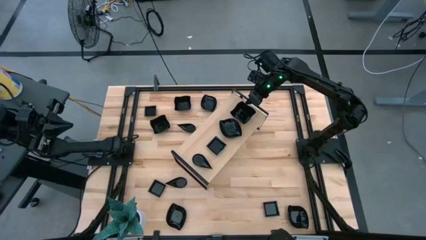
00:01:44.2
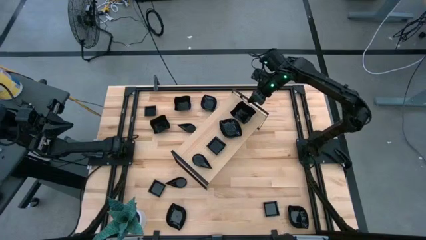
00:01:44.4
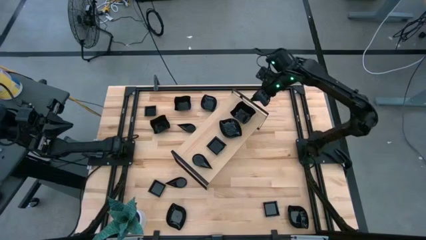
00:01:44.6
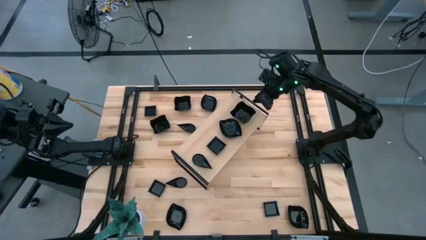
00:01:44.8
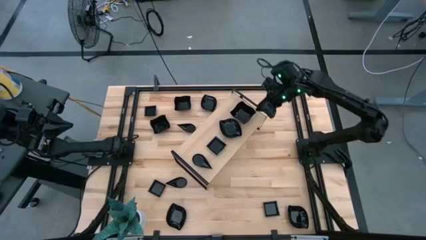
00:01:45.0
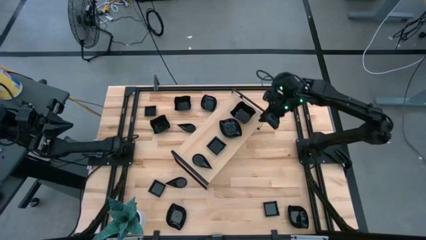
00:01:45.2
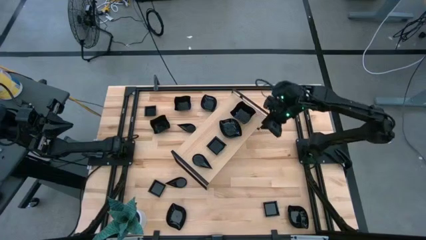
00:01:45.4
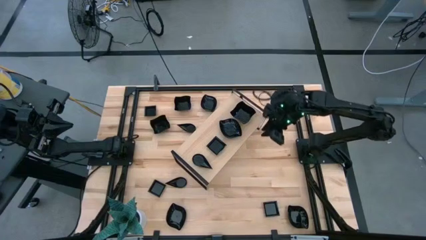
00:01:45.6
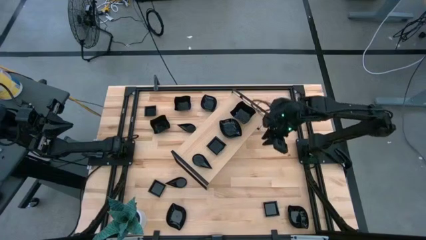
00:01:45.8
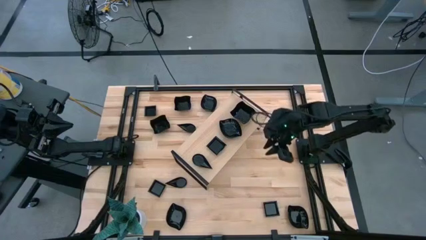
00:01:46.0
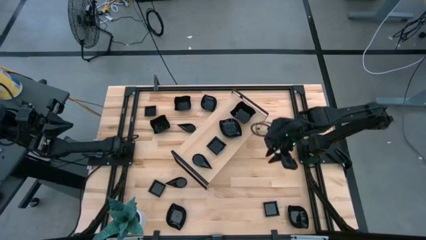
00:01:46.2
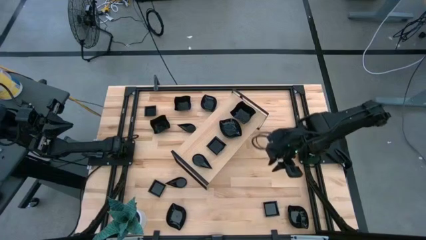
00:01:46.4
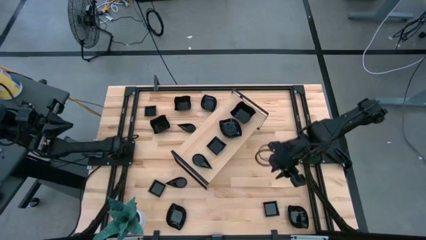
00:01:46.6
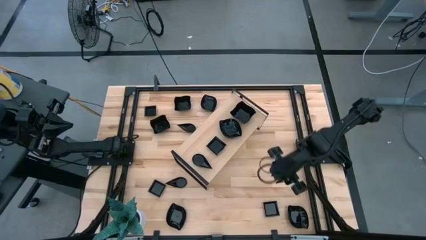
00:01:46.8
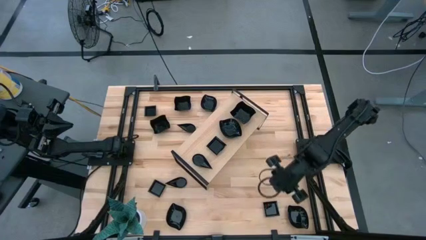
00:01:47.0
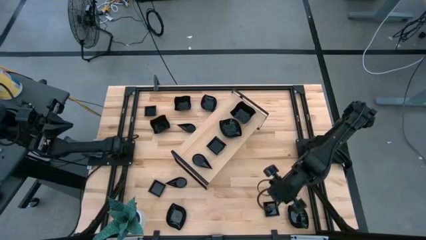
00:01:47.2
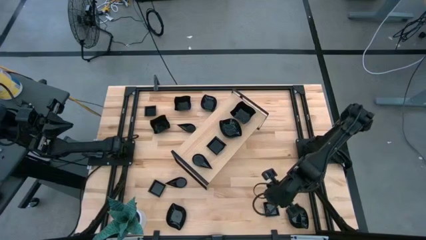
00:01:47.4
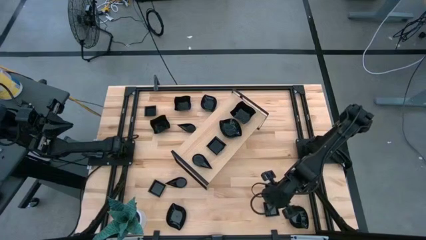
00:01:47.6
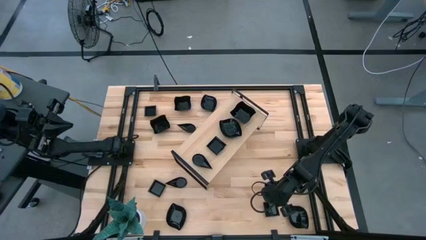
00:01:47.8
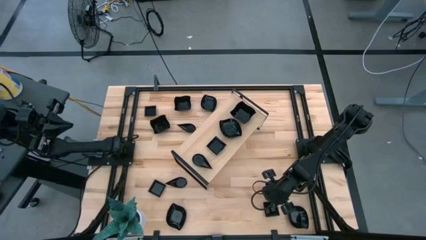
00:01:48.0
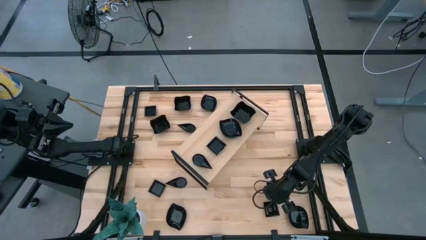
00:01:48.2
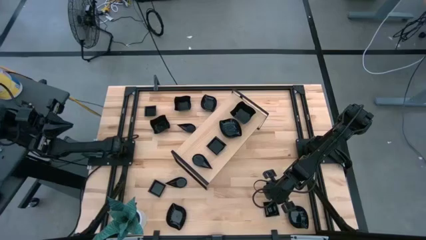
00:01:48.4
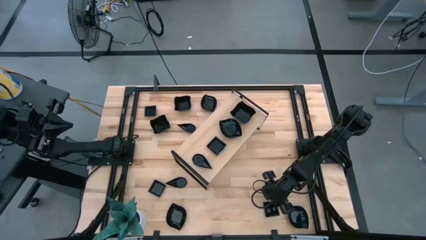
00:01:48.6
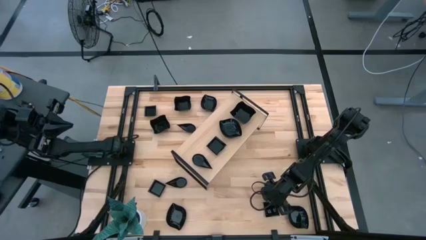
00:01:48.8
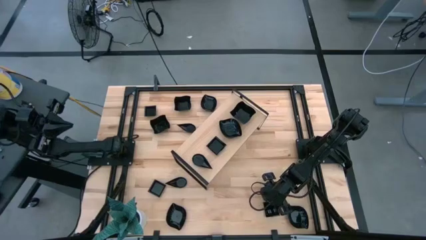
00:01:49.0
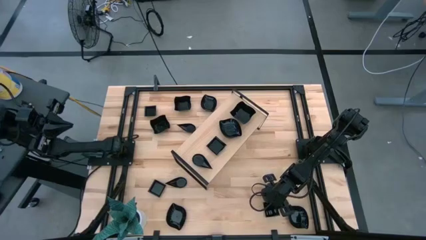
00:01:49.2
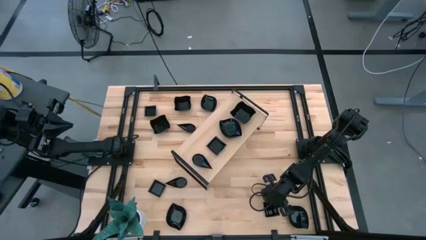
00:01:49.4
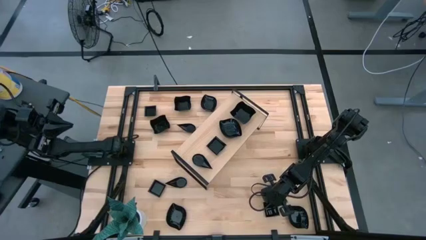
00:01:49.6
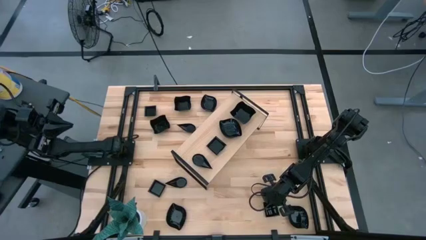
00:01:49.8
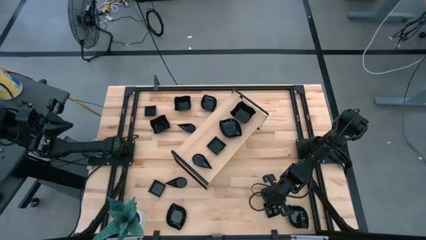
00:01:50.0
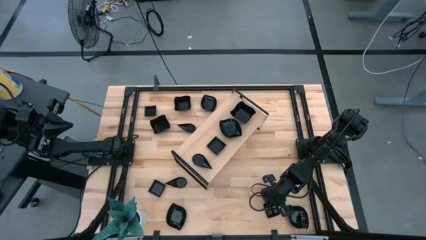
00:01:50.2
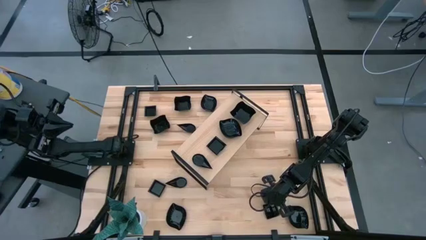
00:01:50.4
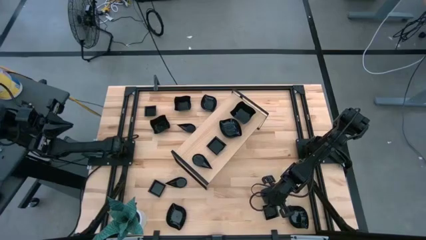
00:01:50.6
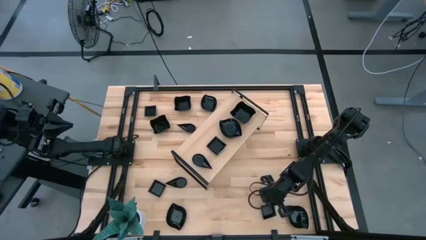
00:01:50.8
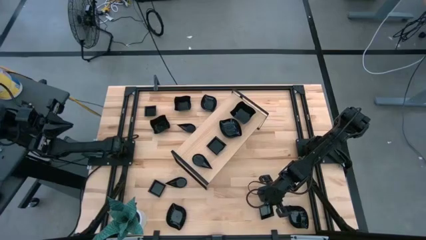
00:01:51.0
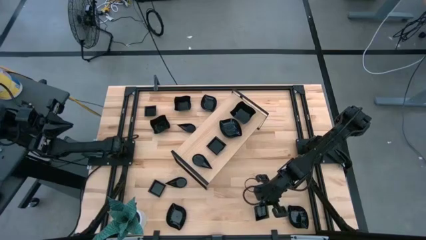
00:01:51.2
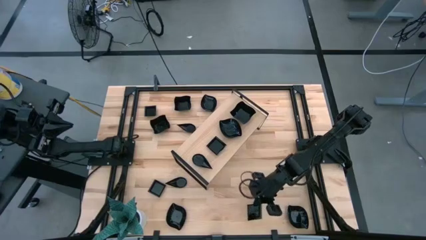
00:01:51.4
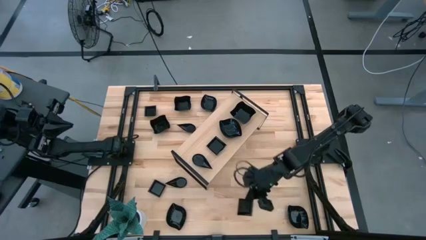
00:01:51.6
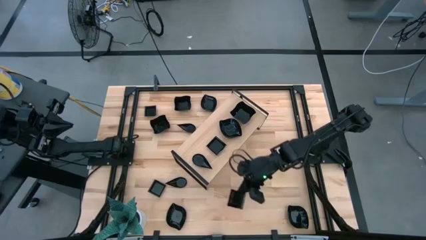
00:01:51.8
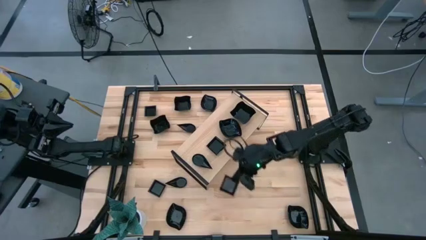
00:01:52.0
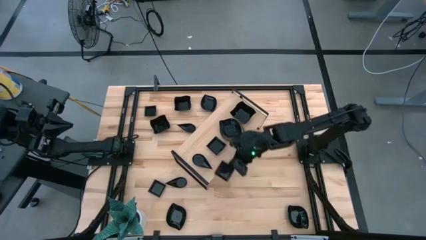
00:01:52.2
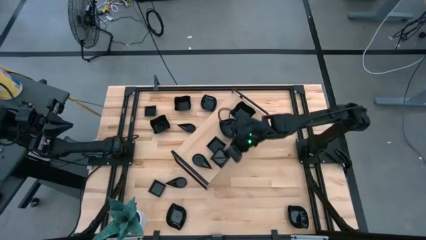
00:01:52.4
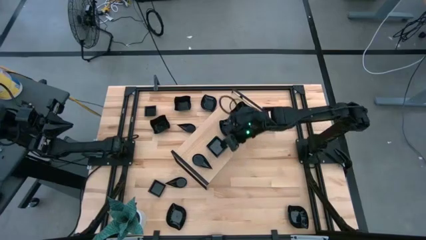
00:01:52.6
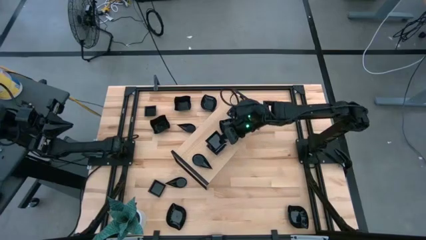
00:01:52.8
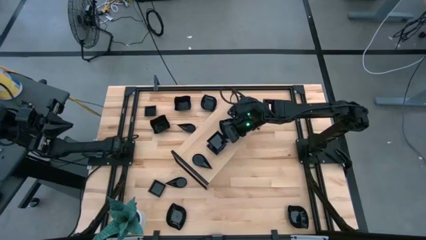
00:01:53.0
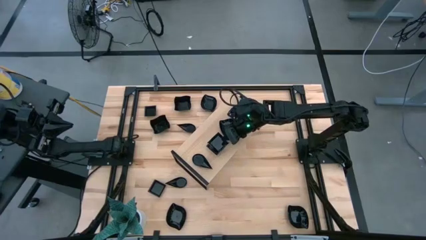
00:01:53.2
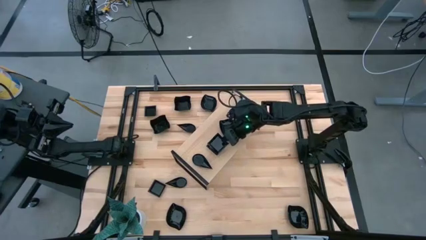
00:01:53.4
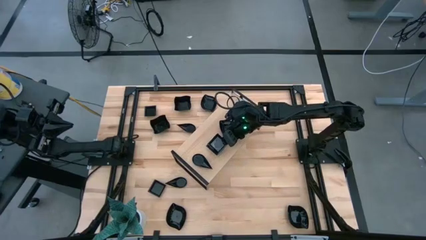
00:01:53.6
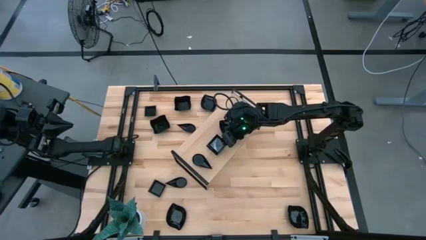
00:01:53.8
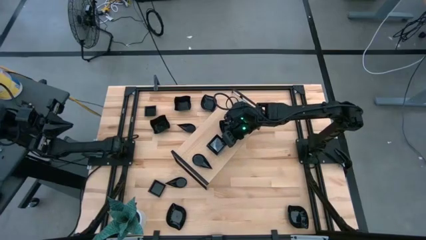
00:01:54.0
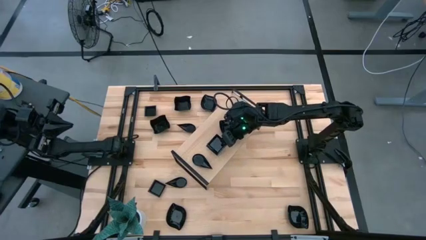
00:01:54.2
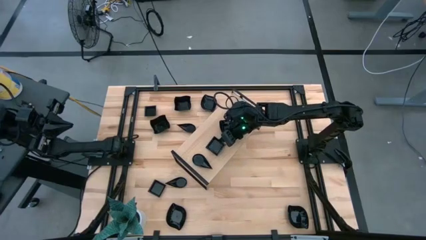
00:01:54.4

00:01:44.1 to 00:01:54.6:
Task: Pick & Place Mini shaped plates
Stack the black square shaped plate on top of the black square shaped plate on the shelf
